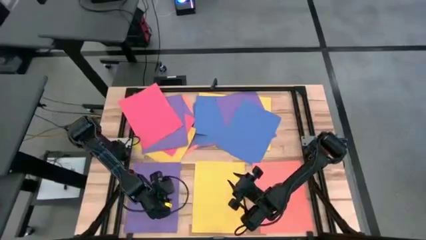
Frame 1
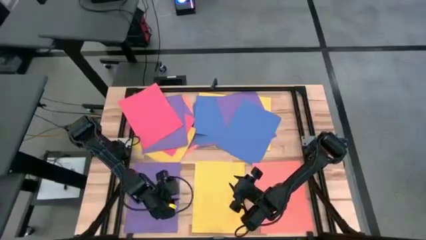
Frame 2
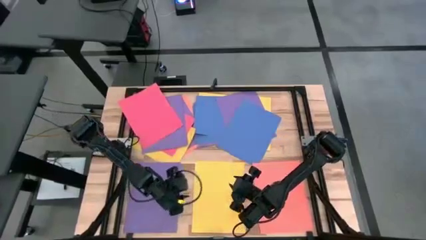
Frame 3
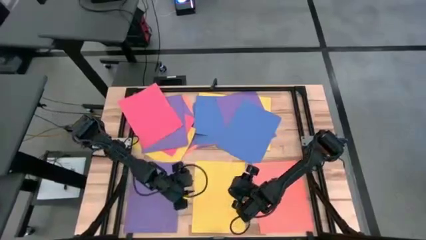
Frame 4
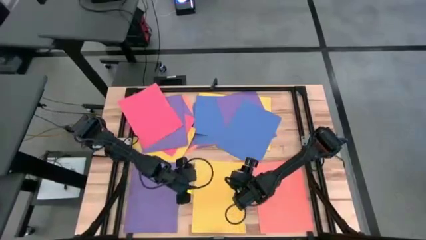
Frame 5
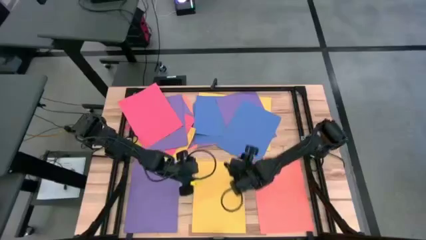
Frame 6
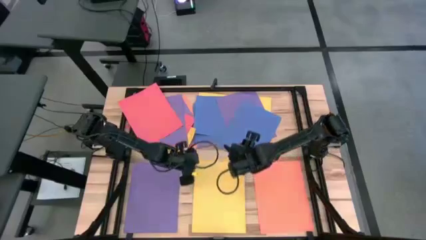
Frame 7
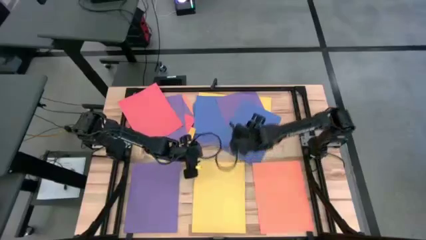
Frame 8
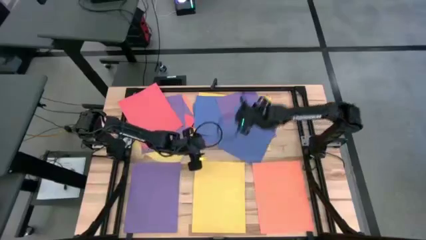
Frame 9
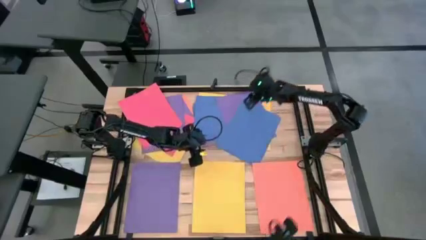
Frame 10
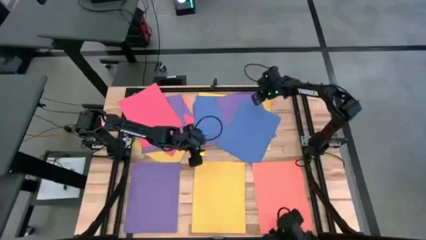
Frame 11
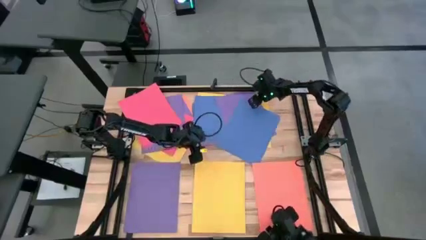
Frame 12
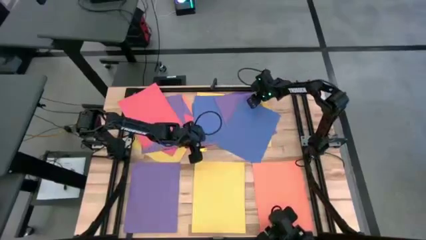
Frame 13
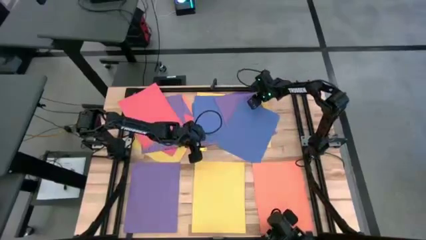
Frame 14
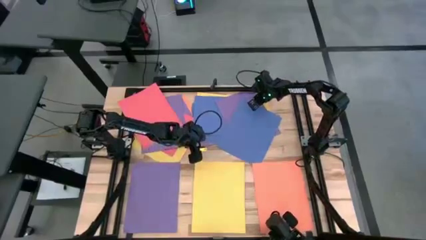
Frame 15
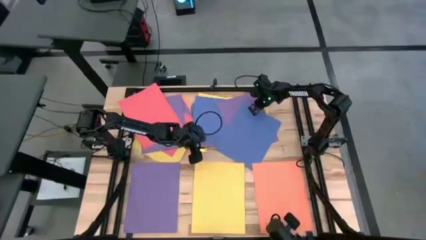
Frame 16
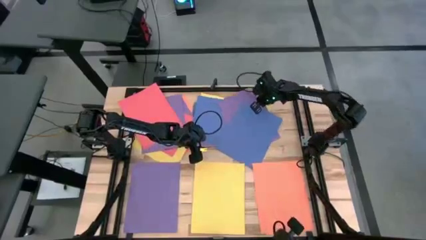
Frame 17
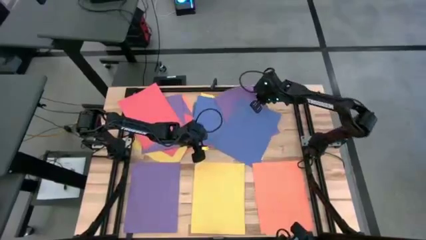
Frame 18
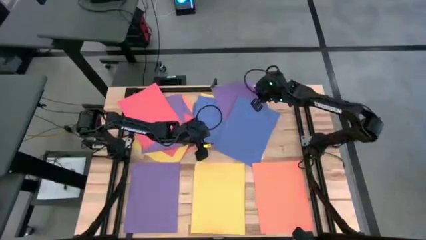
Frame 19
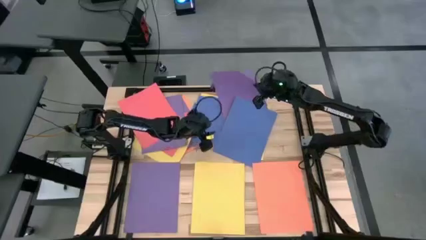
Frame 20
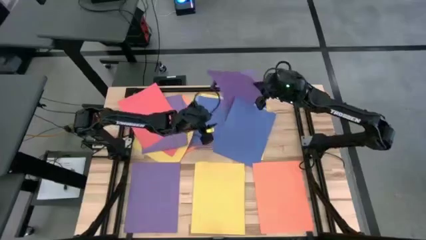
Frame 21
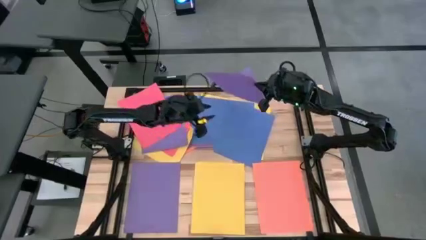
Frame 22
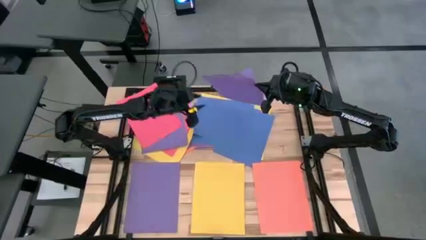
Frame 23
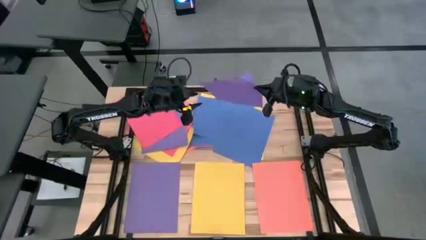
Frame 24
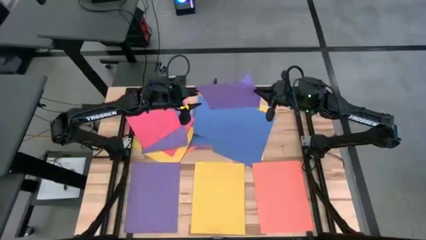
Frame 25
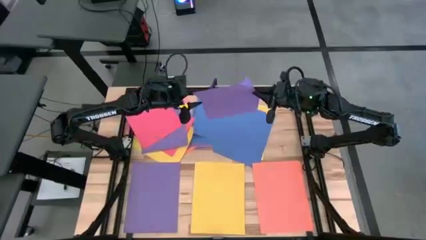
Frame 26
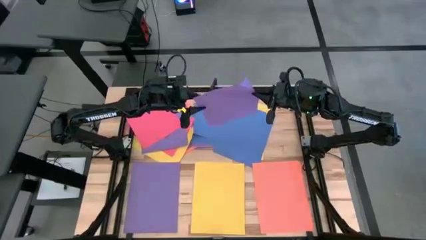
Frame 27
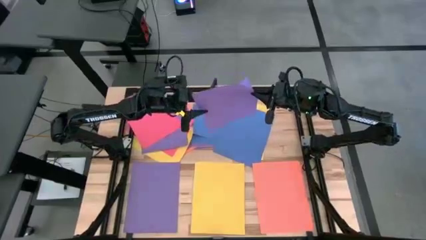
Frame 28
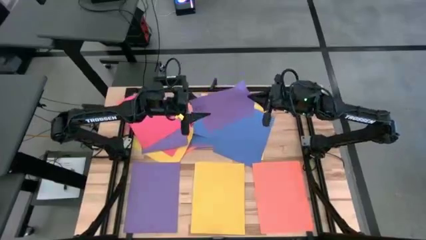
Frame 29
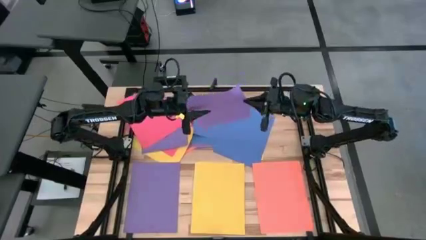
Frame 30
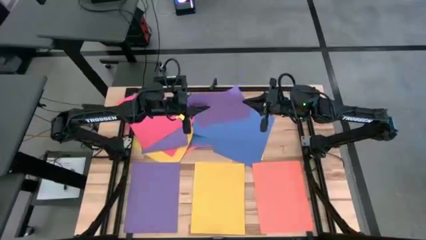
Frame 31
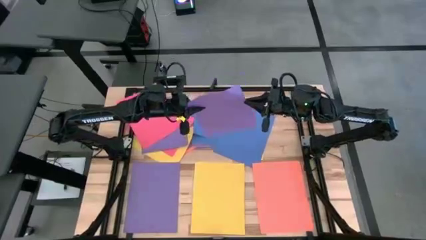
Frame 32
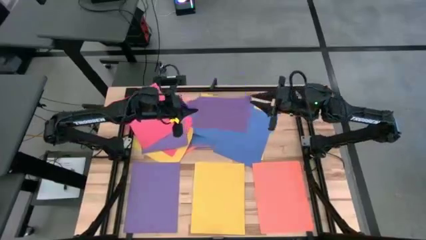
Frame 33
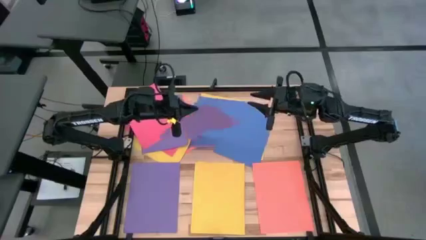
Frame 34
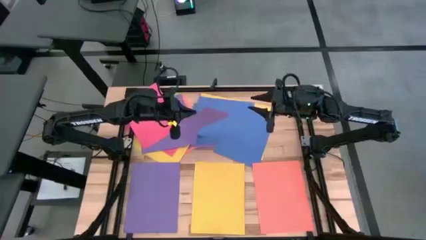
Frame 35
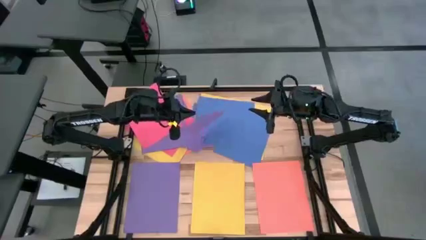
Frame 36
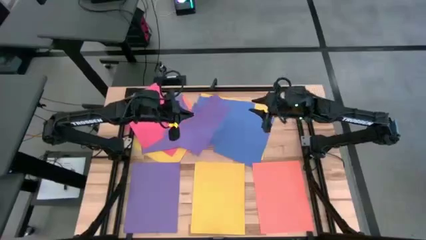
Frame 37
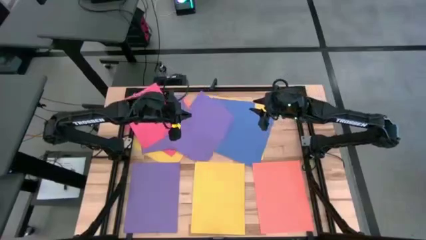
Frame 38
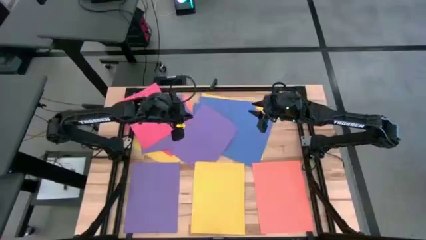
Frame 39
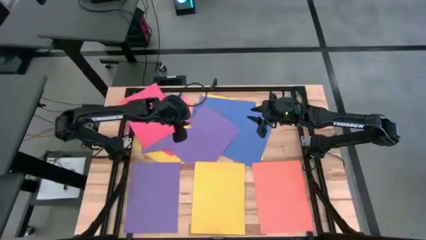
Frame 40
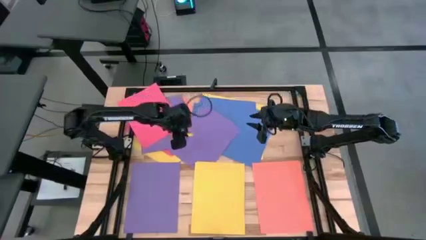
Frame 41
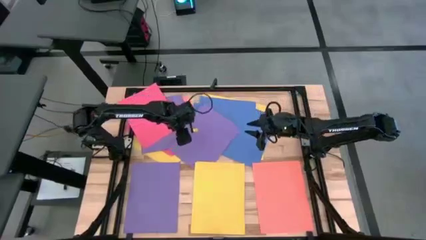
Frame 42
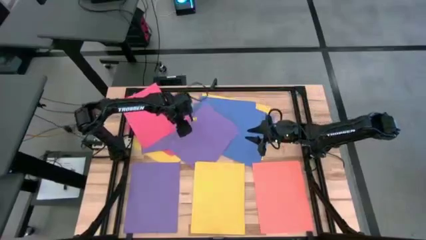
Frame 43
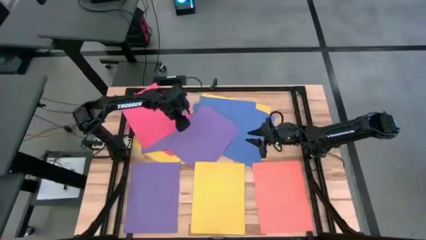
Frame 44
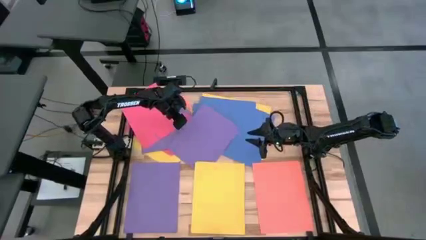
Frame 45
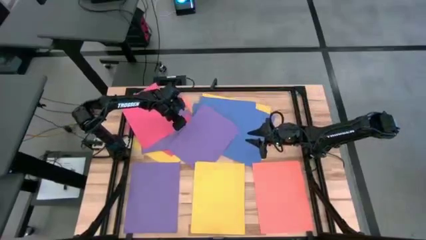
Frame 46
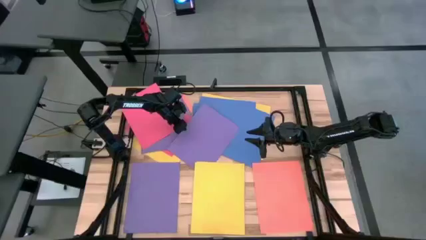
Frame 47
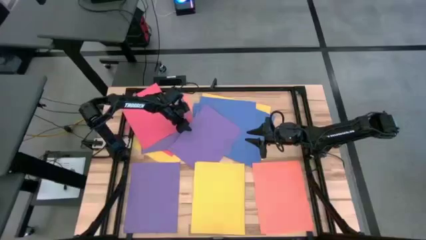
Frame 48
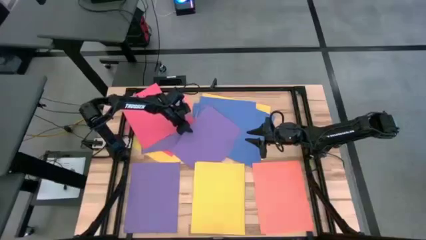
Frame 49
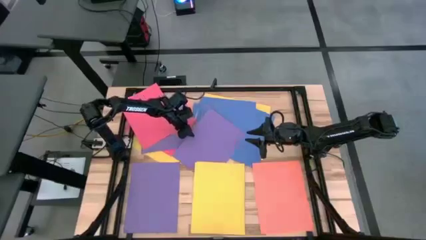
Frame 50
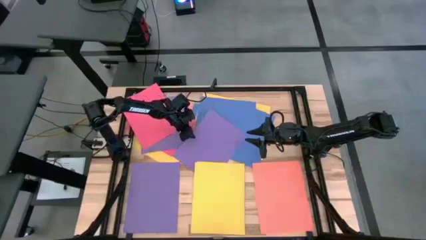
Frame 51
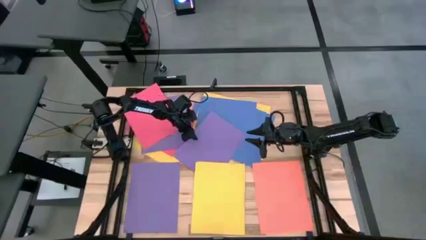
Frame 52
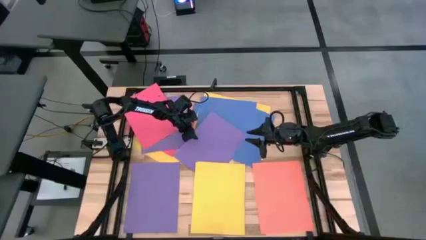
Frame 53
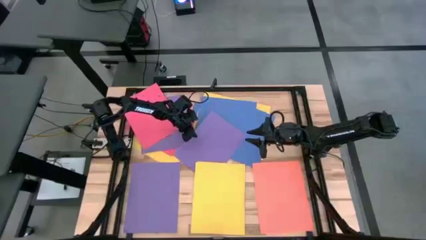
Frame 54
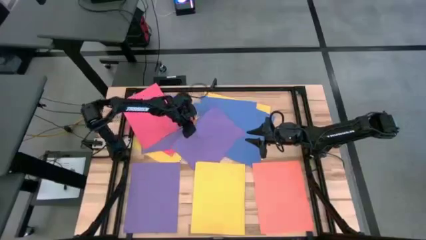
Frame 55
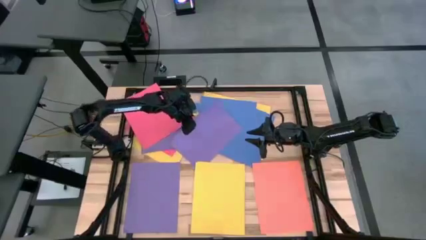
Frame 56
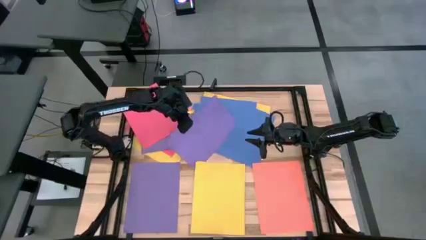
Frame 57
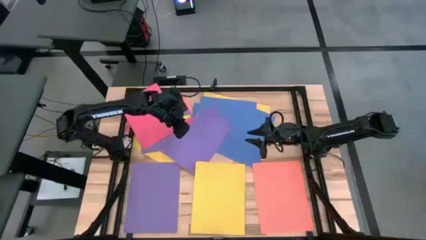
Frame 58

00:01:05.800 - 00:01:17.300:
Task: Organize paper
Stack the violet paper on top of the violet paper

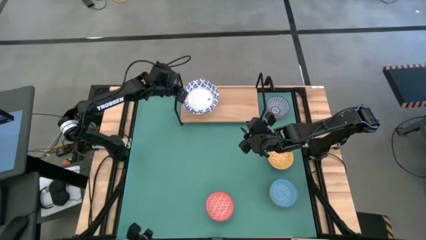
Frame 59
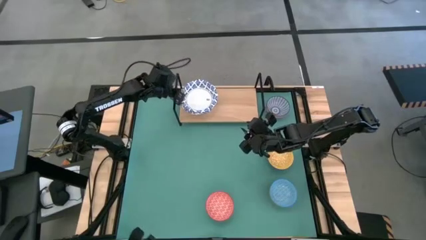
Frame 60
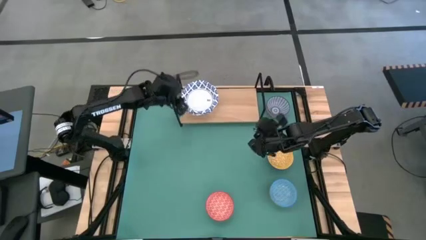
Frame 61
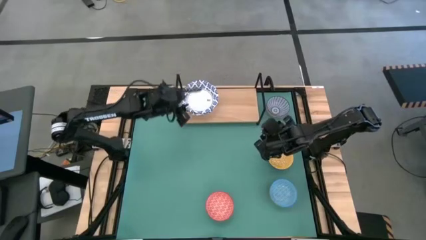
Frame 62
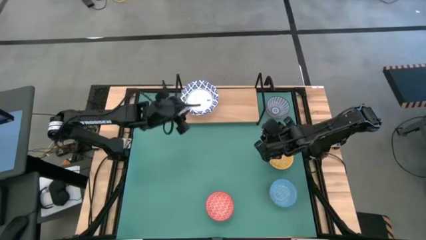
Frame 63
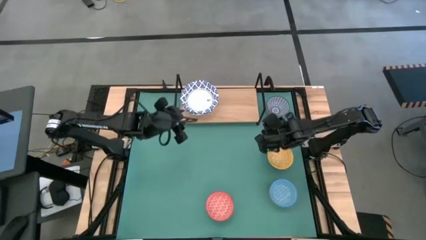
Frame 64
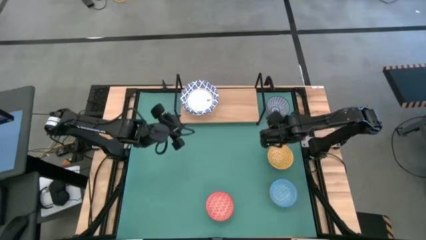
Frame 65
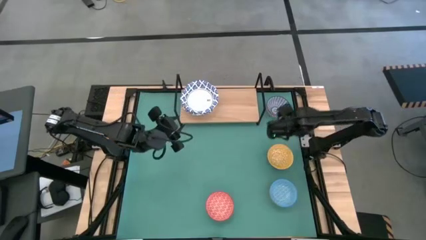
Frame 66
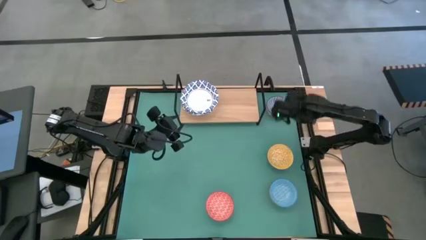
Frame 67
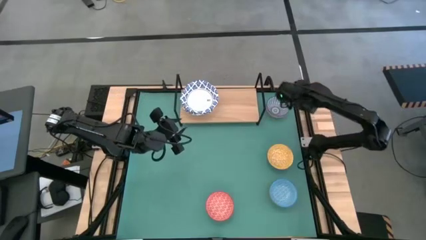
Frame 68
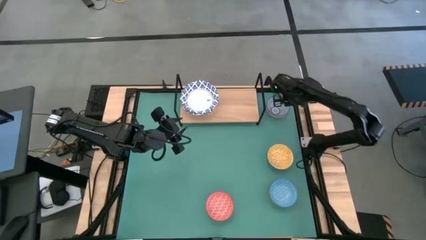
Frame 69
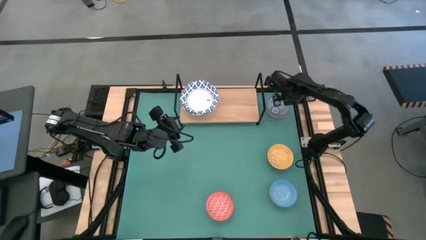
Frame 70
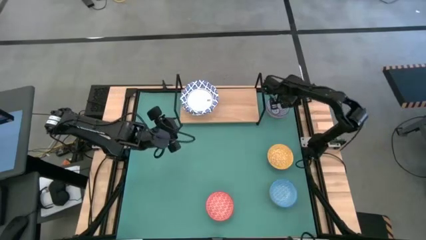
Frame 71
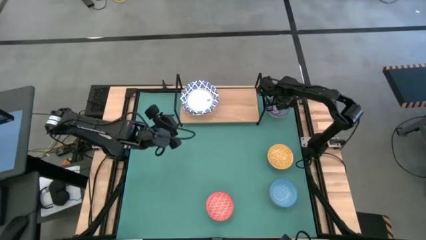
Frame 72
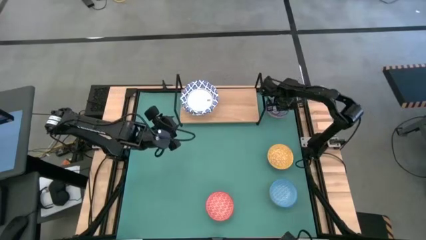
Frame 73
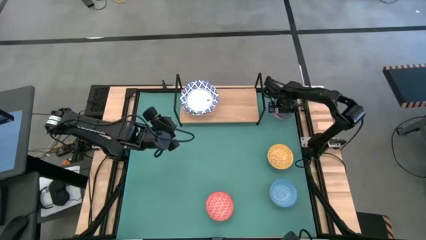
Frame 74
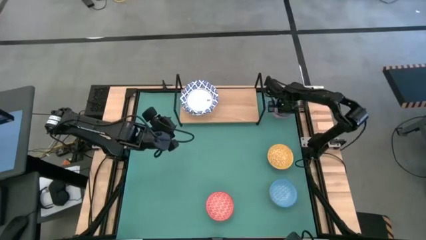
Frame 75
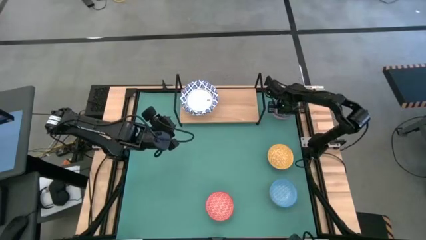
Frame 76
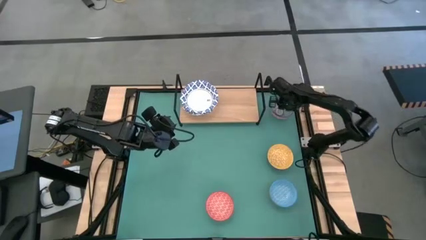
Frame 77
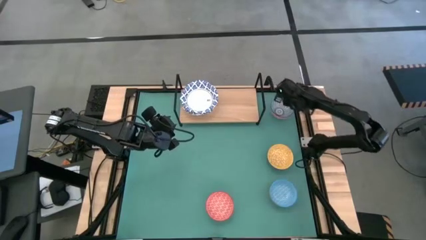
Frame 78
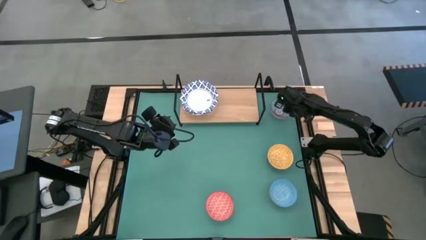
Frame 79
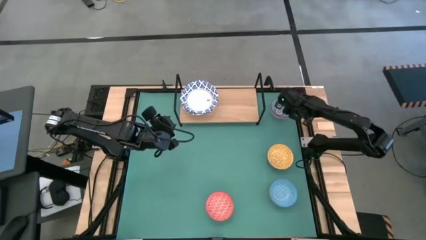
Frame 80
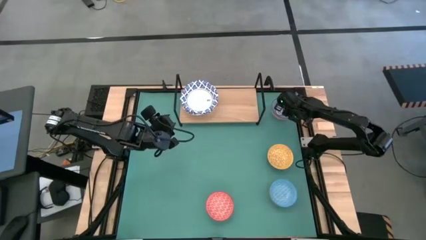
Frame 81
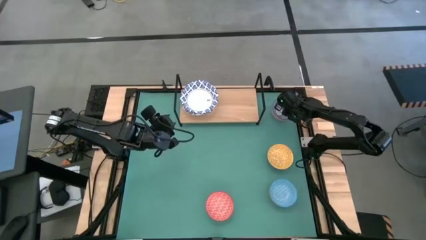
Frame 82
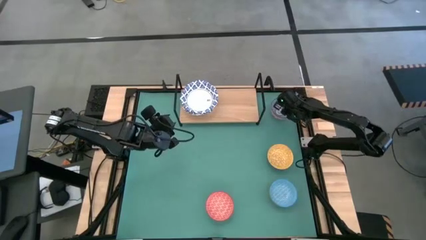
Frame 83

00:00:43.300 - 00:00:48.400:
Task: Place and stack bowls onto a shelf
Put the blue patterned bowl on the shelf
